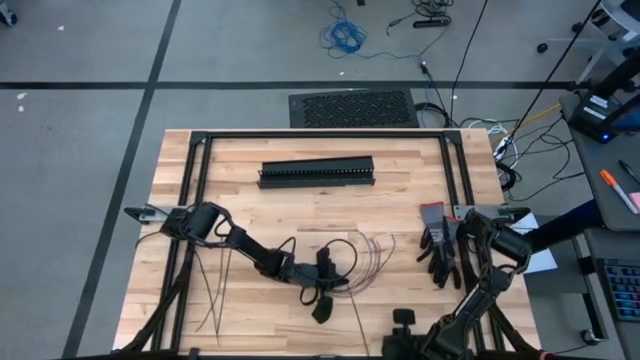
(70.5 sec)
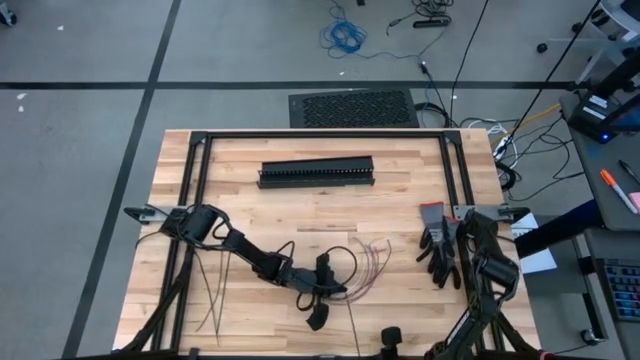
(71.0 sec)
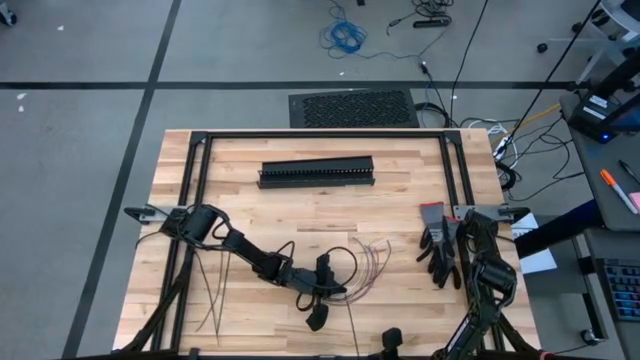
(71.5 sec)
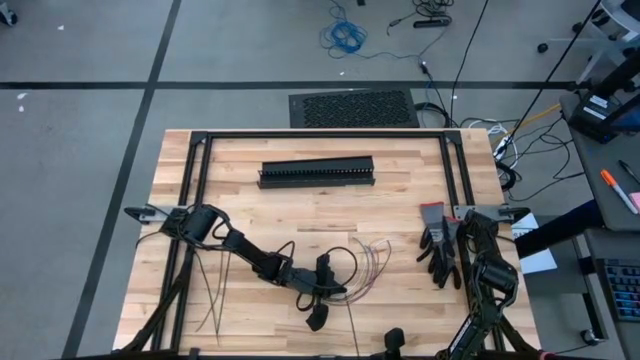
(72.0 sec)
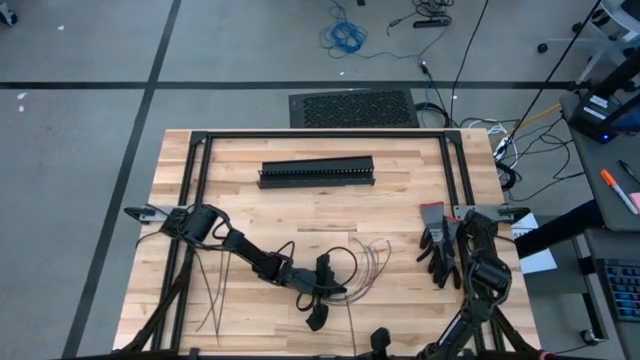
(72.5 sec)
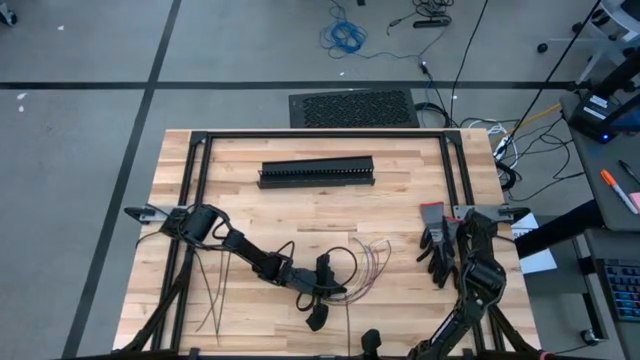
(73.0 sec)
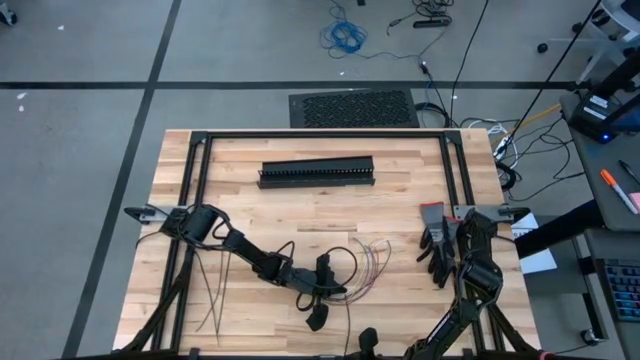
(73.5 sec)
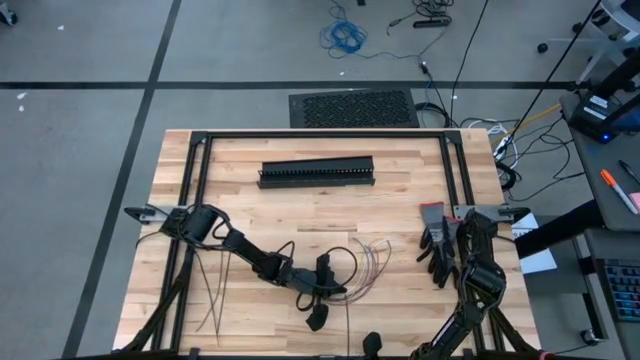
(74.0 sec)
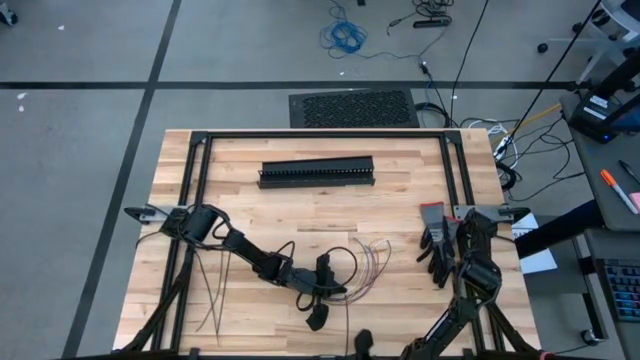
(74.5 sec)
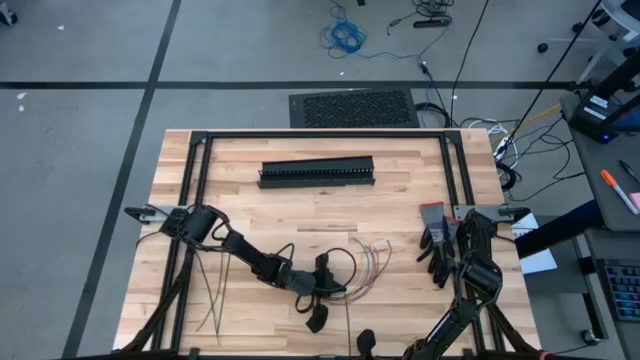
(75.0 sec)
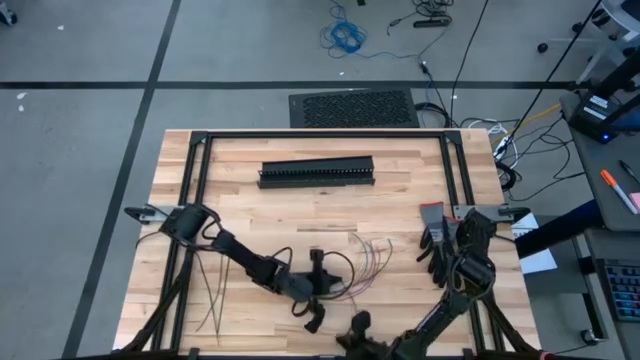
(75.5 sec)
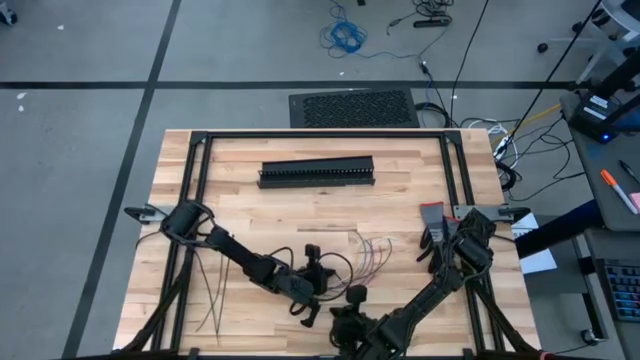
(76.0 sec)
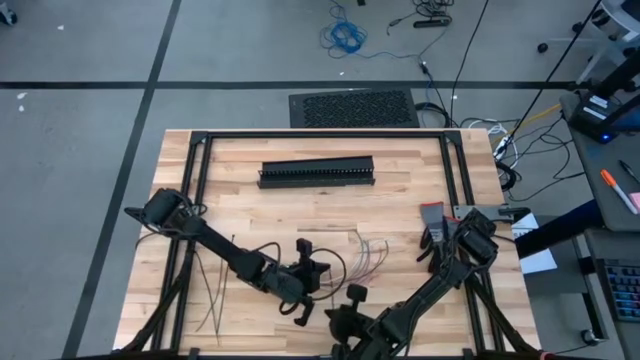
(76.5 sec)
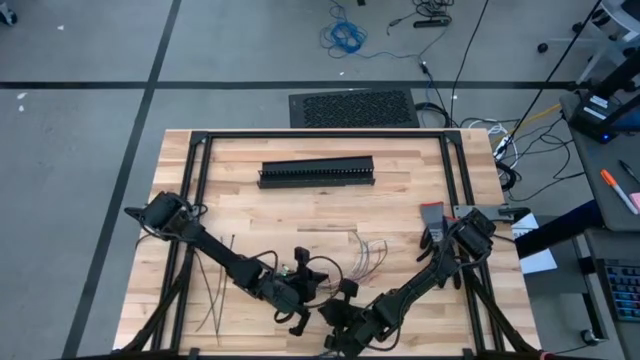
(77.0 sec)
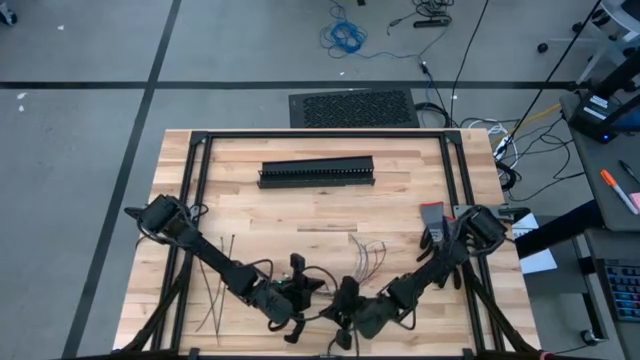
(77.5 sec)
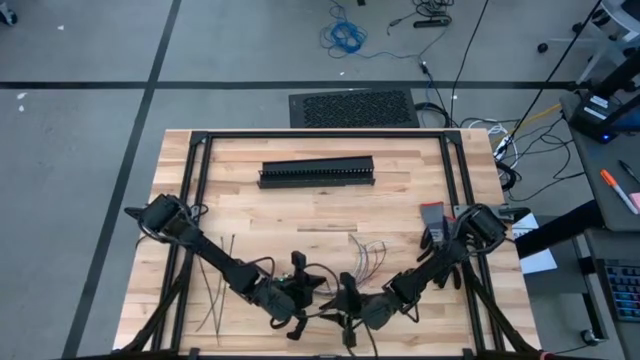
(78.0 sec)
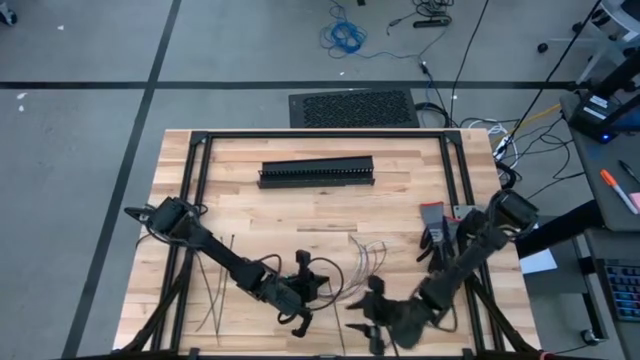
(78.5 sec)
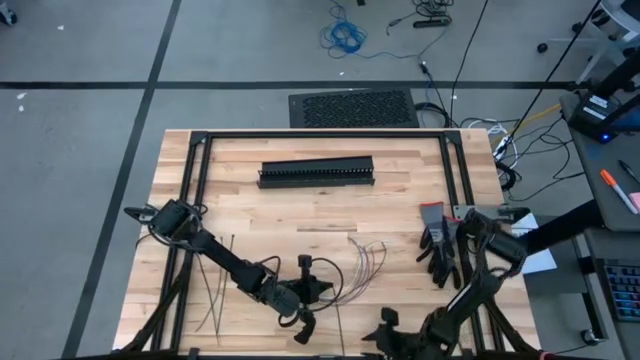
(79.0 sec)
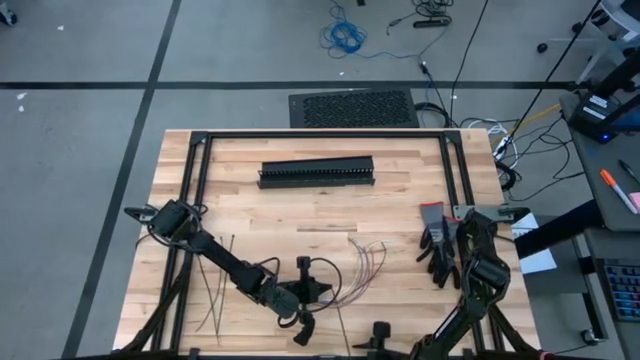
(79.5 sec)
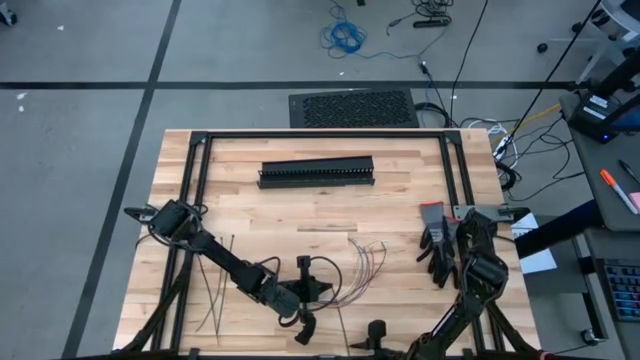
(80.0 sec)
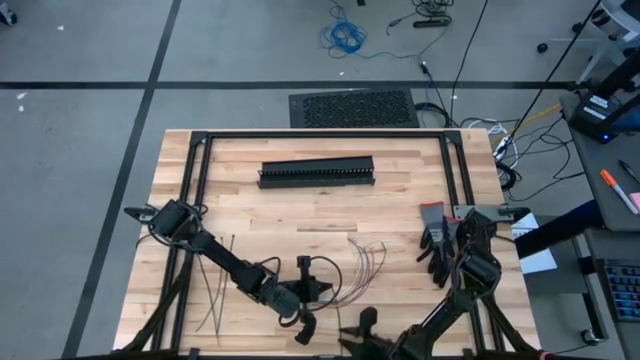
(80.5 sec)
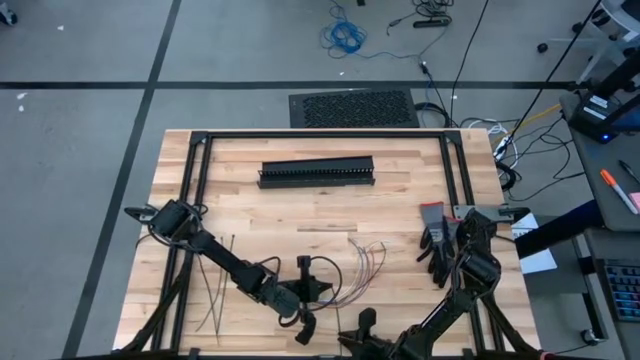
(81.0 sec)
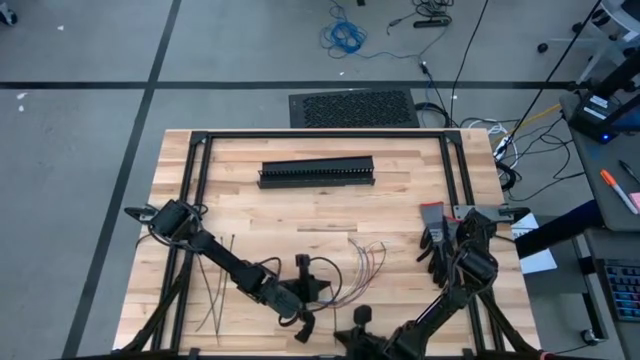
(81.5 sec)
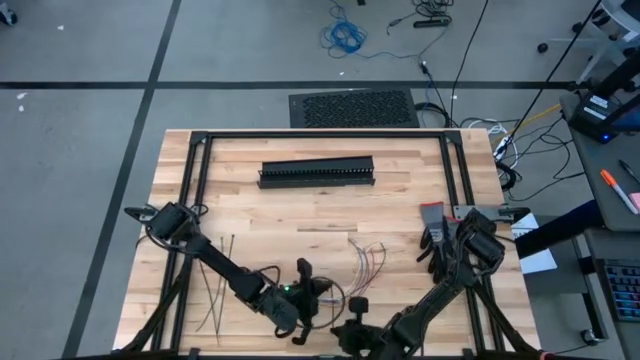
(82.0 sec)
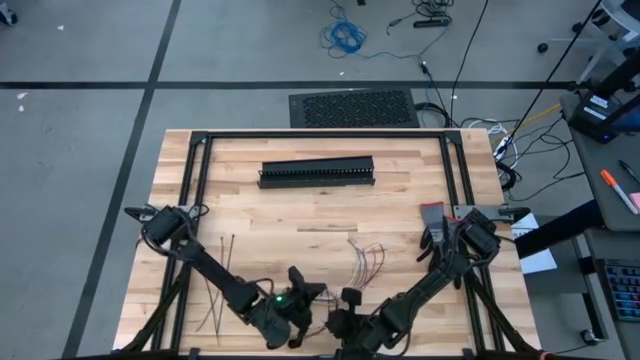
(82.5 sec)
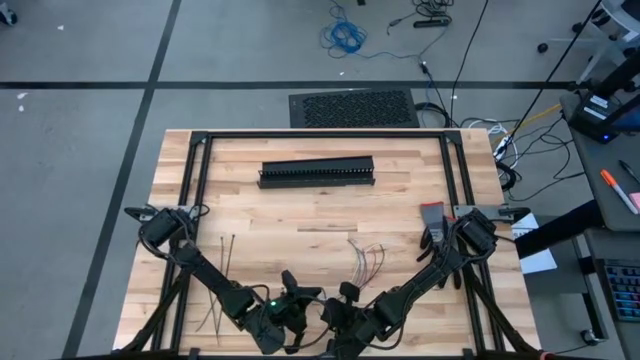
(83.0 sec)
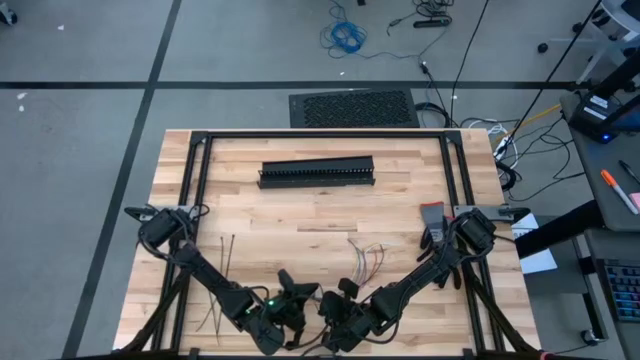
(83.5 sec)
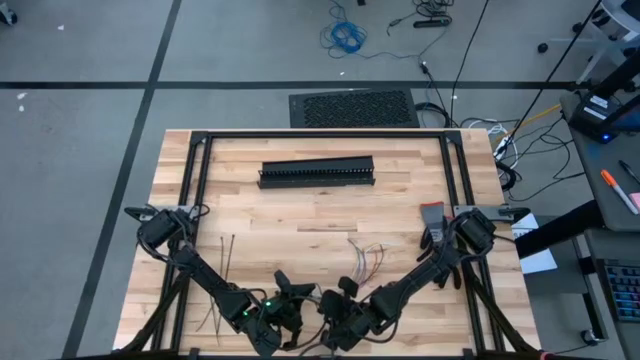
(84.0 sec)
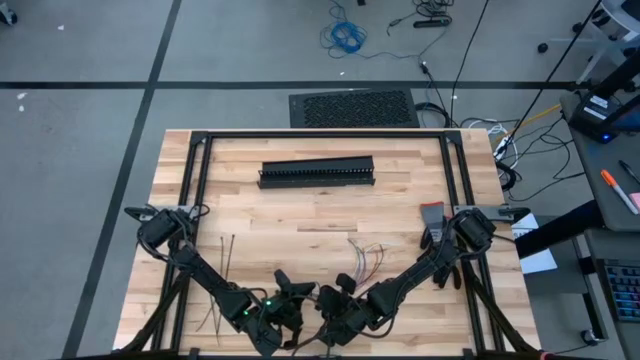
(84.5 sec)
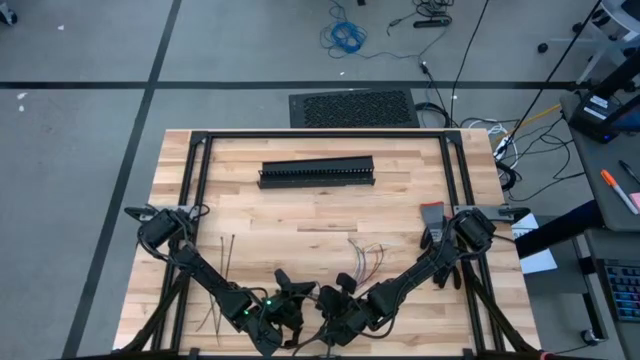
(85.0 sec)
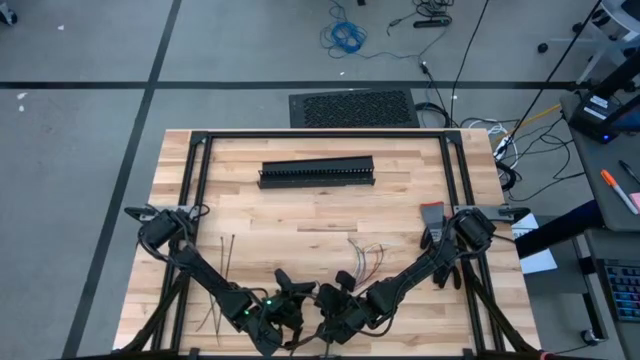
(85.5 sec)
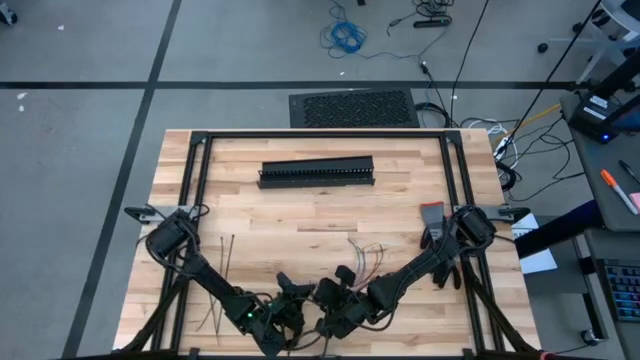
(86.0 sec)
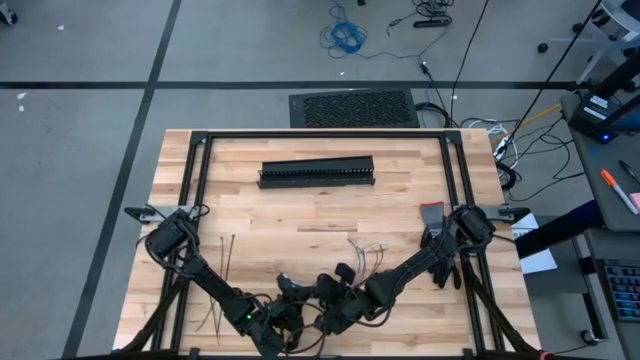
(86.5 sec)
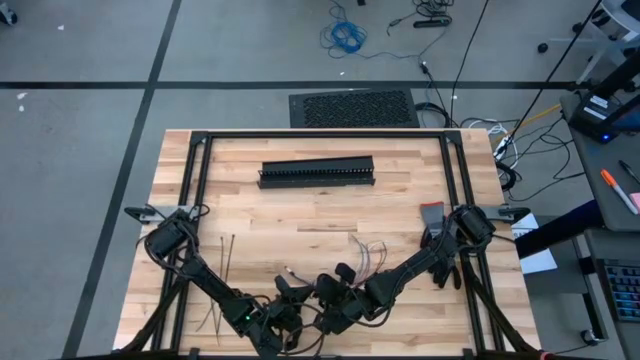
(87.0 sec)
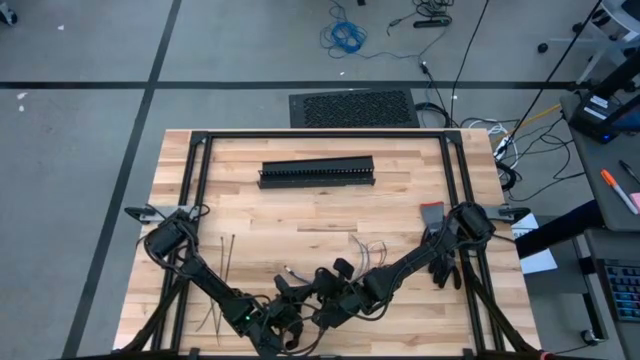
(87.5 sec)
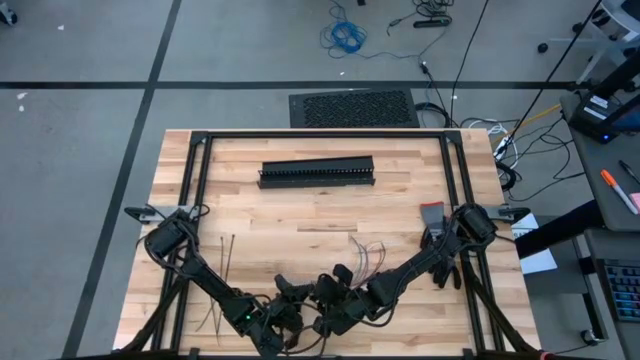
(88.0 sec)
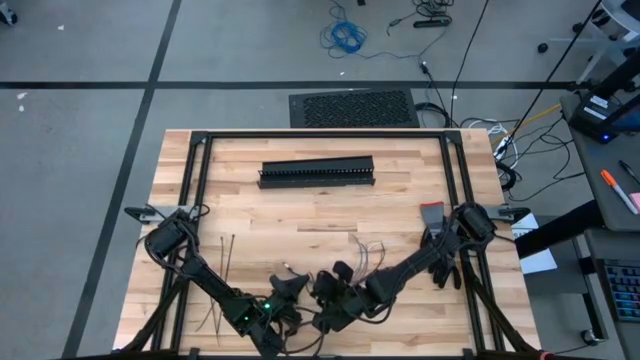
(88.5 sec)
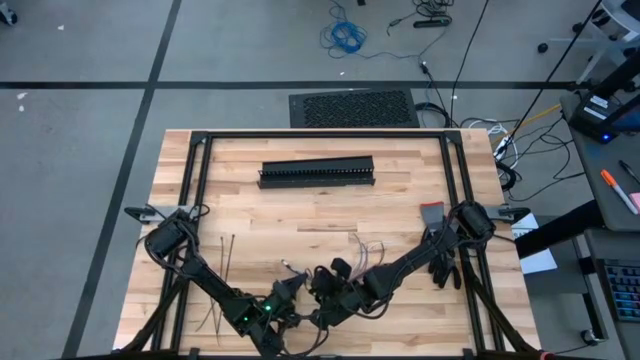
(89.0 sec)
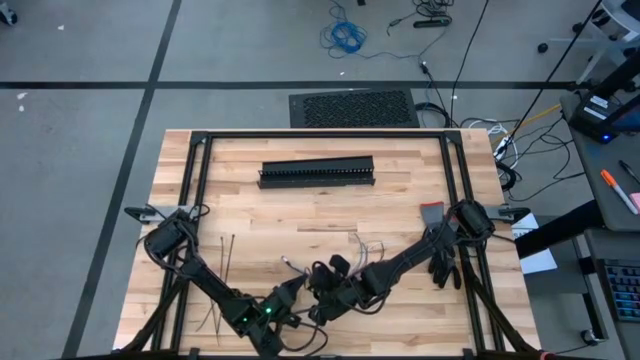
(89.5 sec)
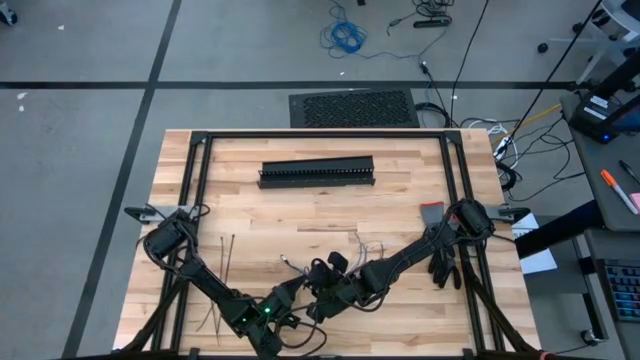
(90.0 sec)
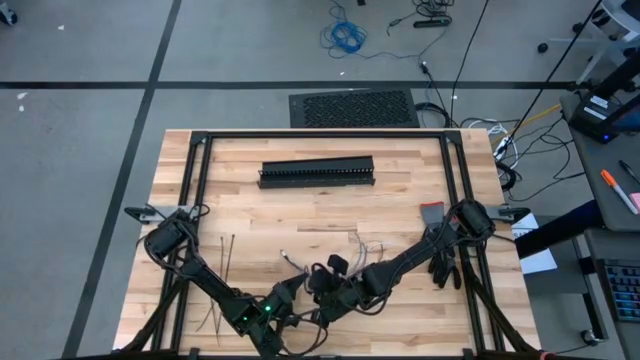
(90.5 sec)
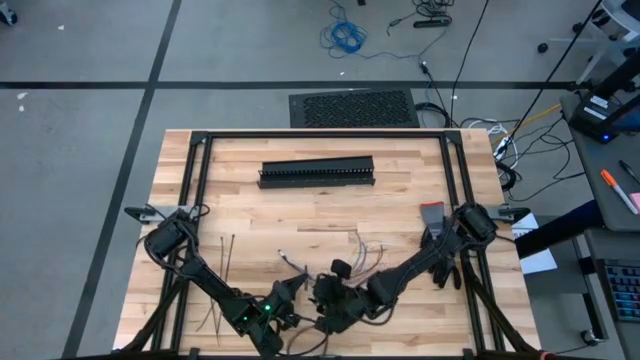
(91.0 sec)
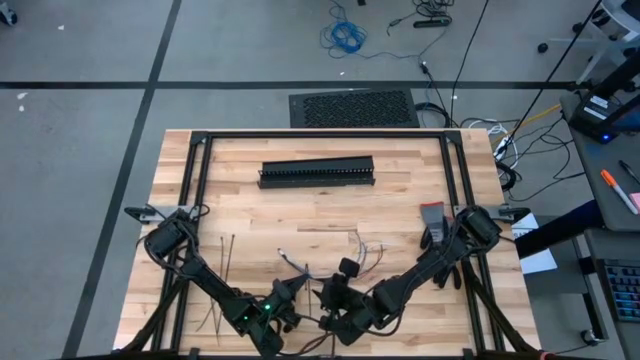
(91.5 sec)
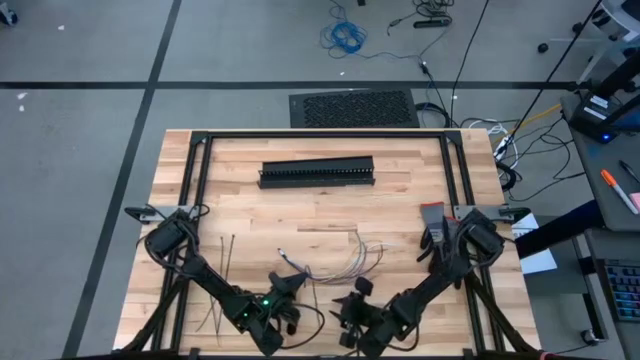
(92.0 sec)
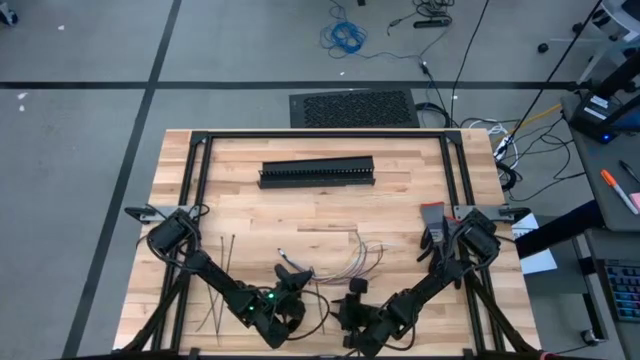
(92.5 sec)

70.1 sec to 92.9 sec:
Task: Ziptie cables
Wrap the zip tie around the cable wires
